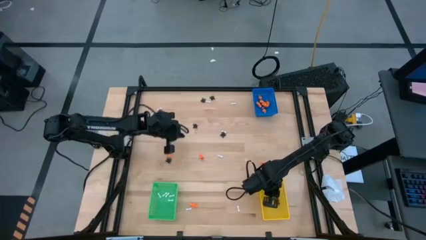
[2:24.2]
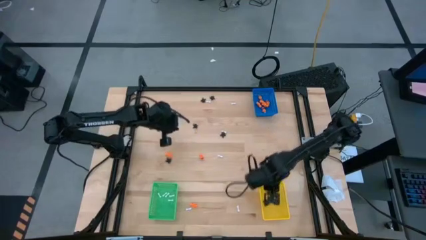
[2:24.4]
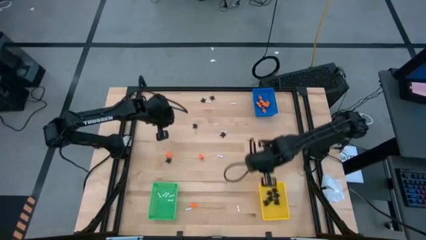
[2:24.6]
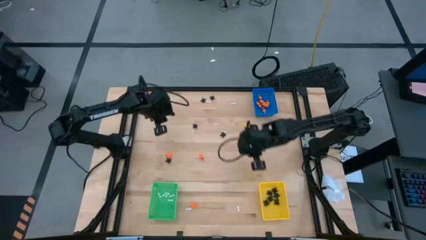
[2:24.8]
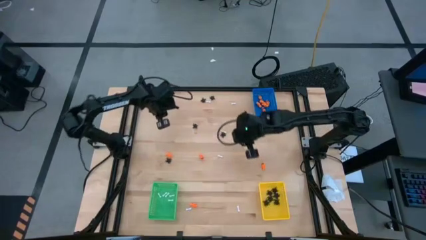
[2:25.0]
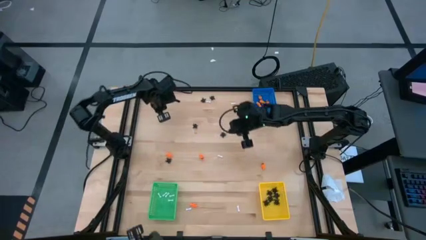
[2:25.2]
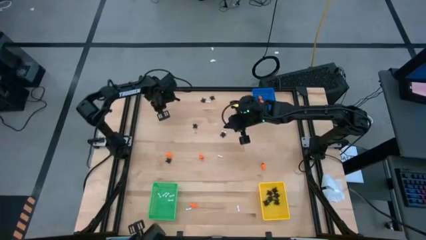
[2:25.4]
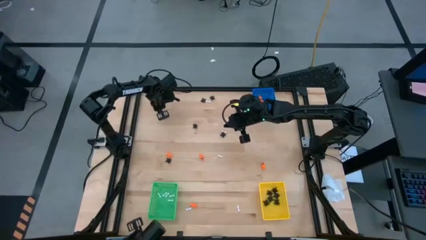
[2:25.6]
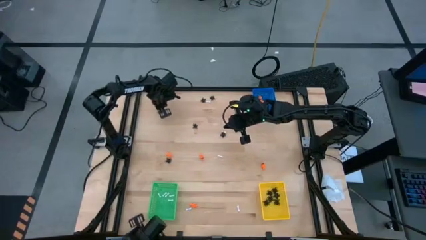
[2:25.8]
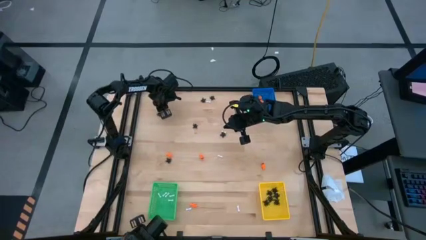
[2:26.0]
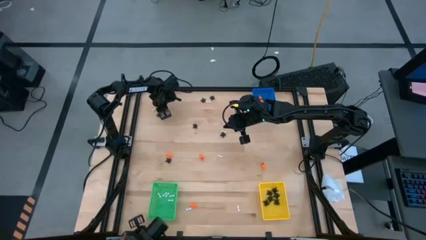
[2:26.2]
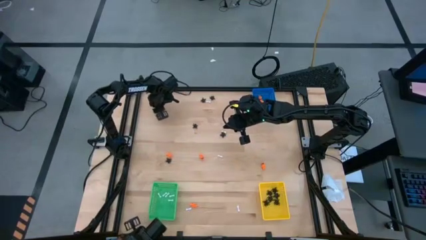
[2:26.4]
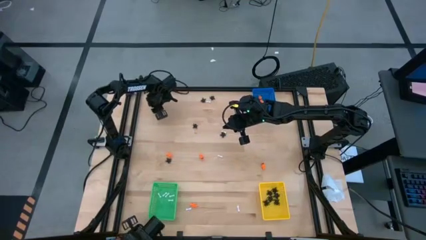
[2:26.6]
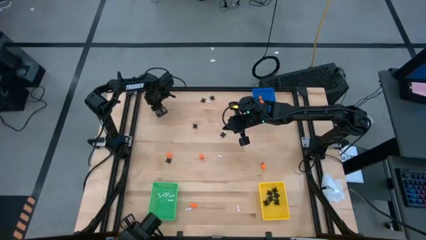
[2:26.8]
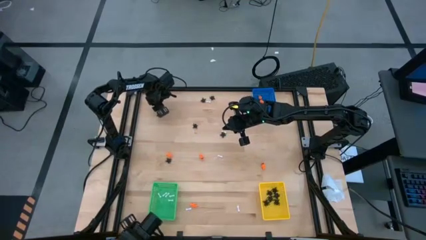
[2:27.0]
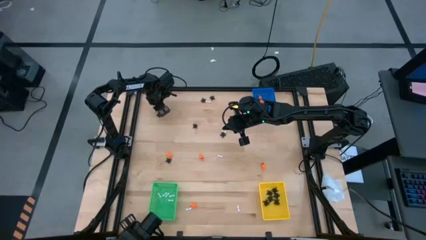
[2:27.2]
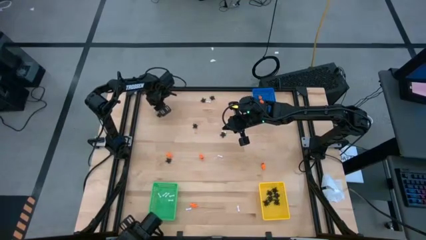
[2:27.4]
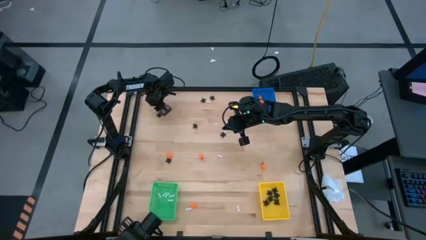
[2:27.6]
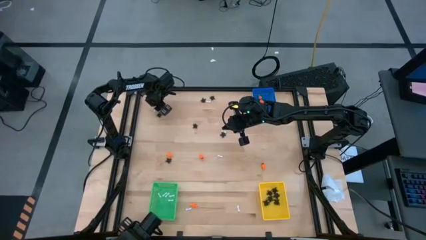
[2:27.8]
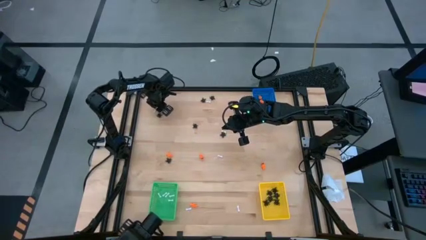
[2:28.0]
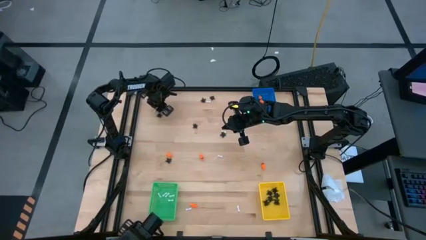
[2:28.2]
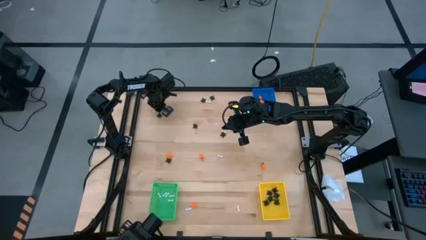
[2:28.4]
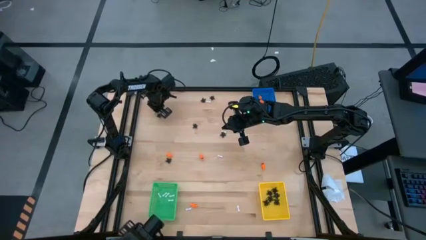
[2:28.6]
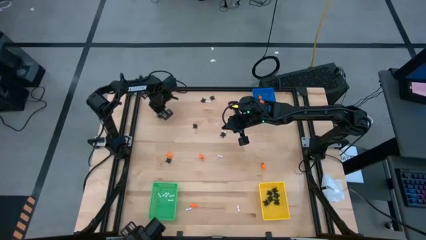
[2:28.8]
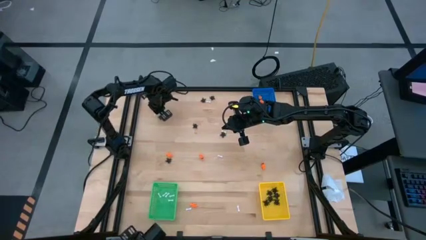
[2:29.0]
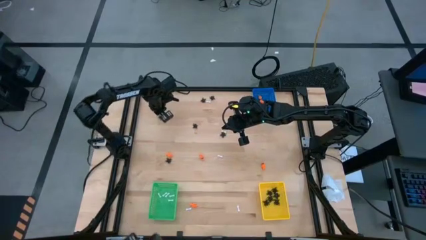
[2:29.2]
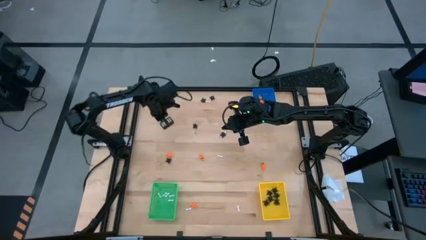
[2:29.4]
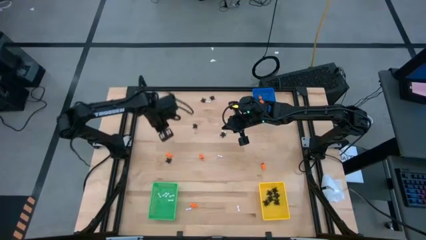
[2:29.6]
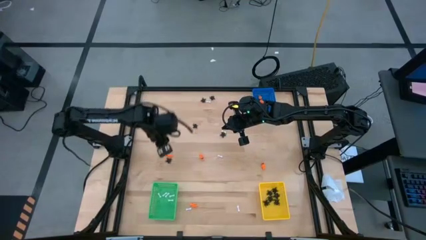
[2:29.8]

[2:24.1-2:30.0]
Task: Sort Halloween decoration
Put the white bone toy into the green bin

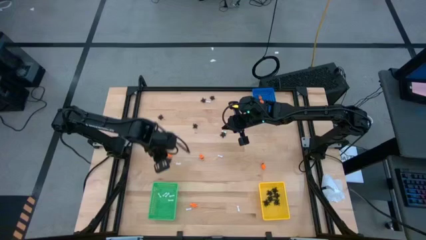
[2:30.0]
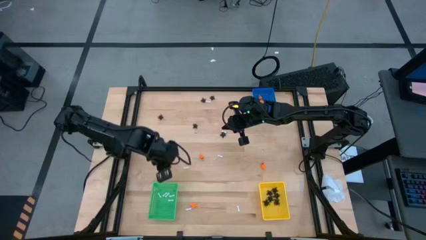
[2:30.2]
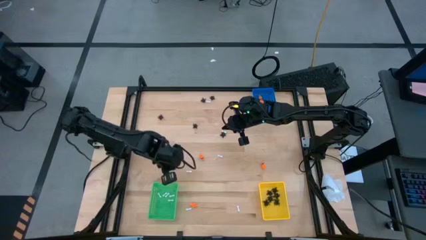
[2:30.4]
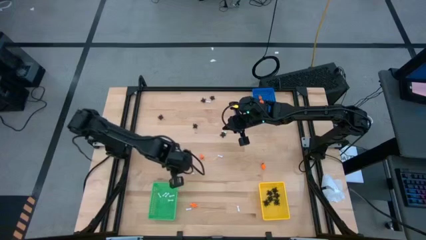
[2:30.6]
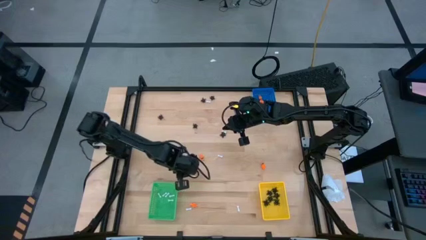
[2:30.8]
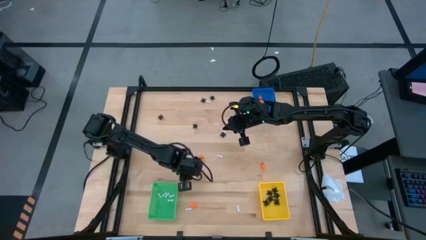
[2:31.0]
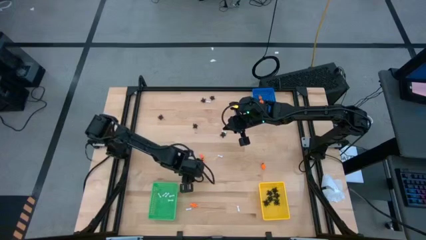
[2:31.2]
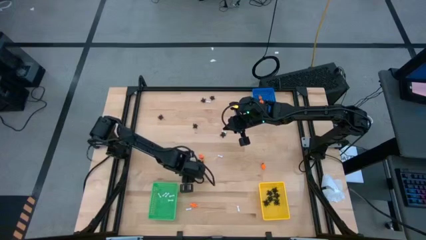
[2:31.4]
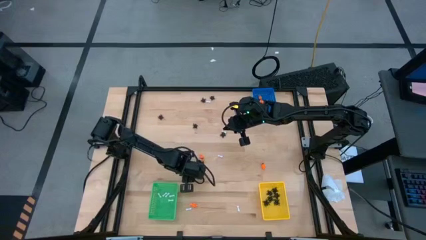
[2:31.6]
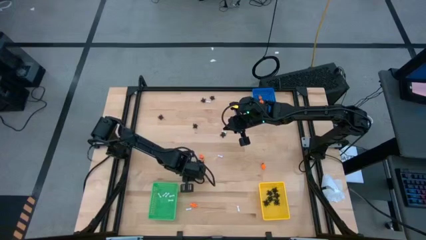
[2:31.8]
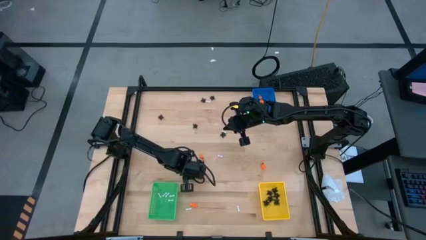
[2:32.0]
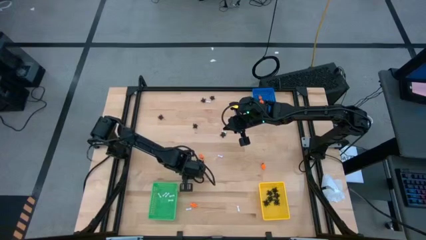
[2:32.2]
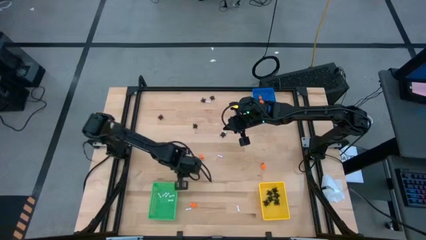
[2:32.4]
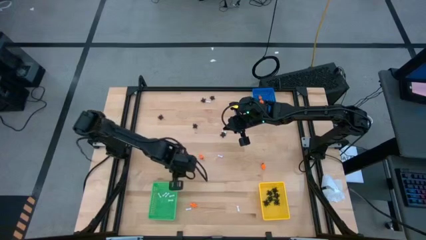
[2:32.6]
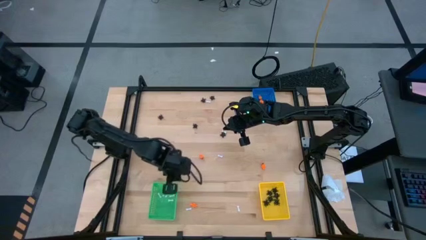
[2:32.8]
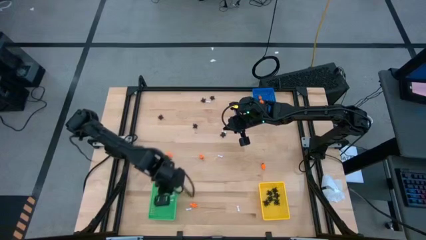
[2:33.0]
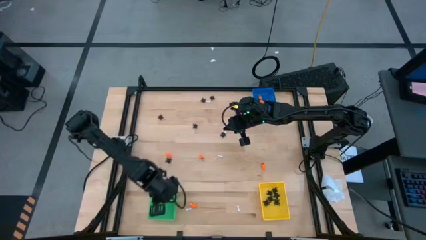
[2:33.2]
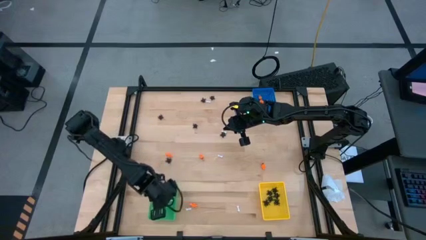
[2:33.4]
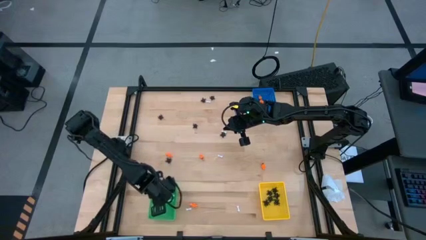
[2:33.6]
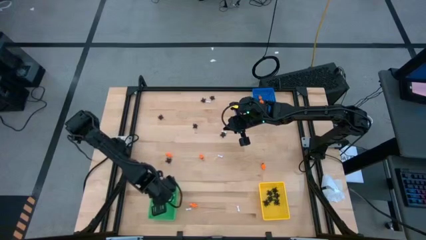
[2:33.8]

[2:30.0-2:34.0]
Put the white bone toy into the green bin

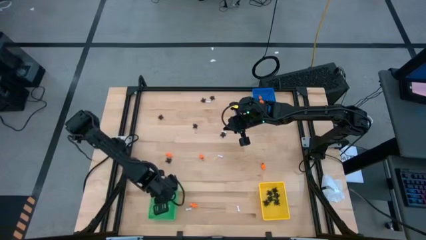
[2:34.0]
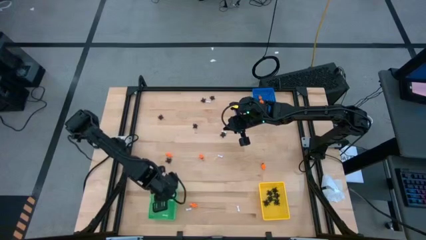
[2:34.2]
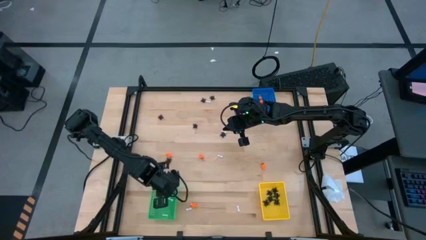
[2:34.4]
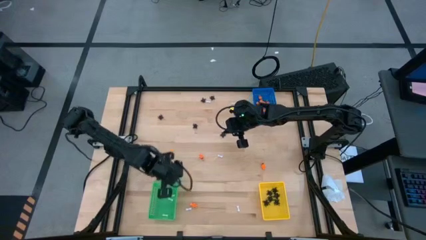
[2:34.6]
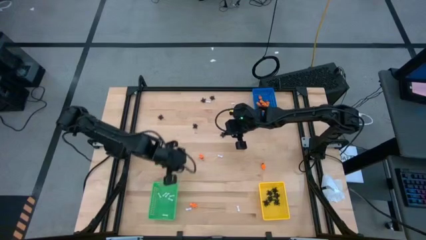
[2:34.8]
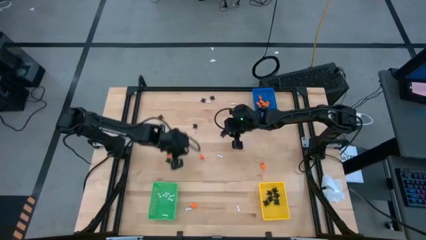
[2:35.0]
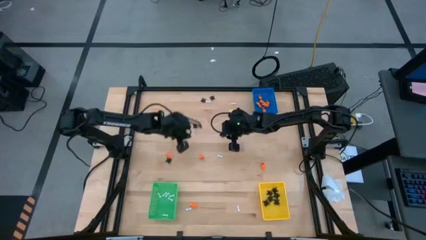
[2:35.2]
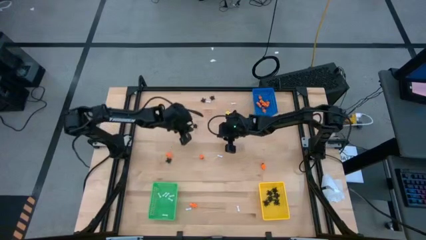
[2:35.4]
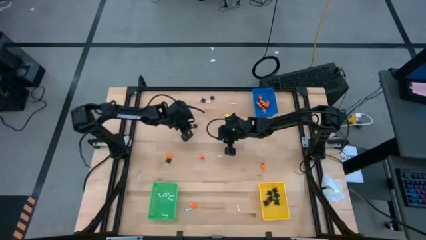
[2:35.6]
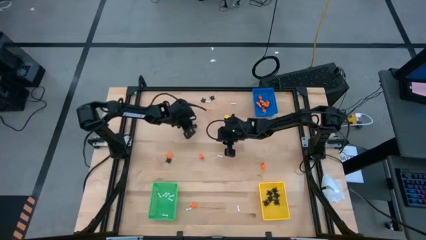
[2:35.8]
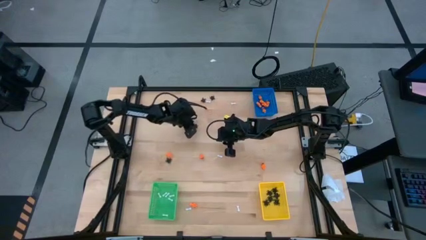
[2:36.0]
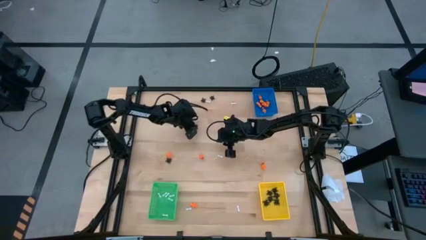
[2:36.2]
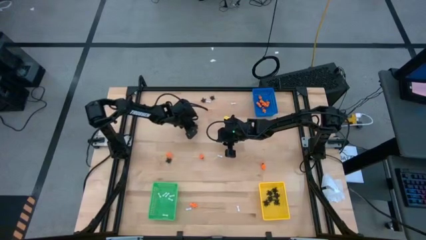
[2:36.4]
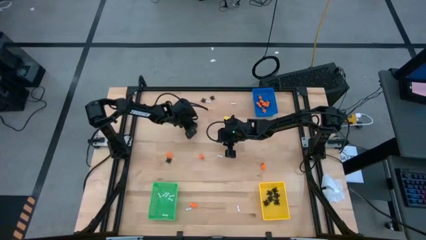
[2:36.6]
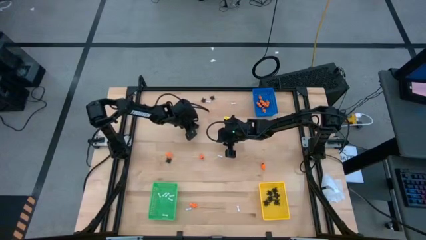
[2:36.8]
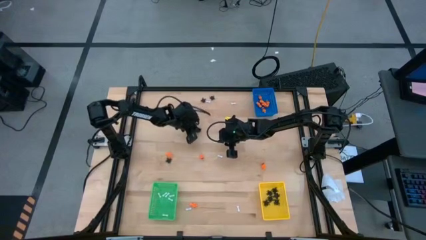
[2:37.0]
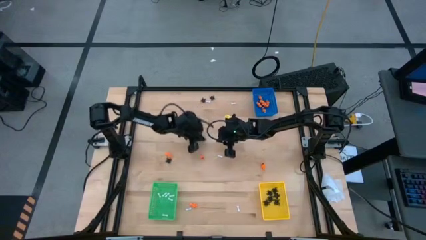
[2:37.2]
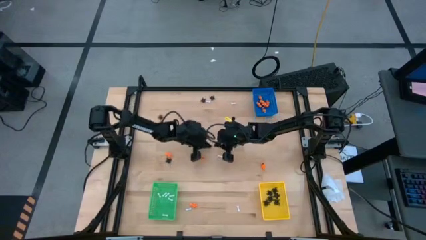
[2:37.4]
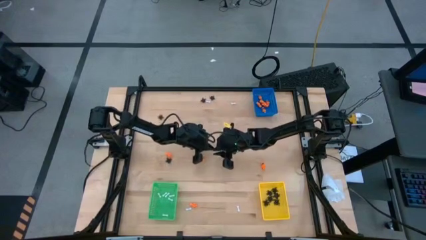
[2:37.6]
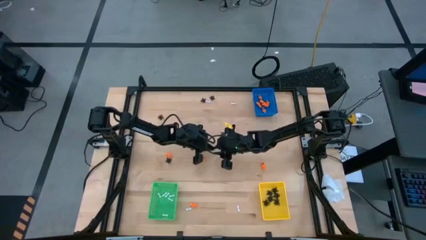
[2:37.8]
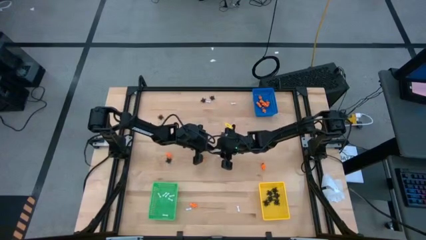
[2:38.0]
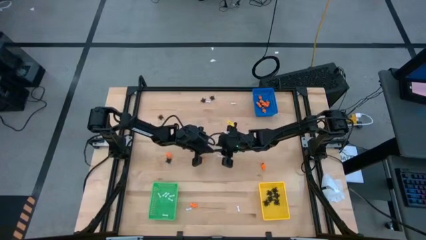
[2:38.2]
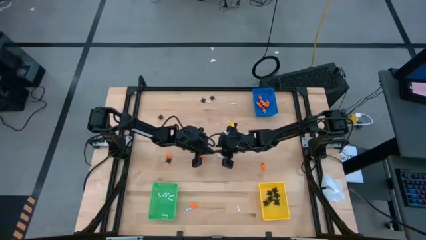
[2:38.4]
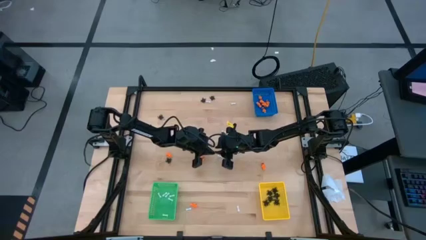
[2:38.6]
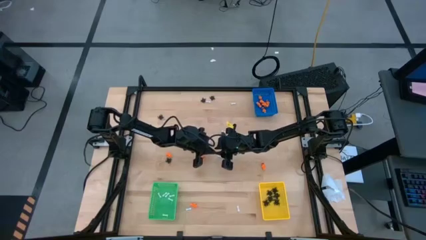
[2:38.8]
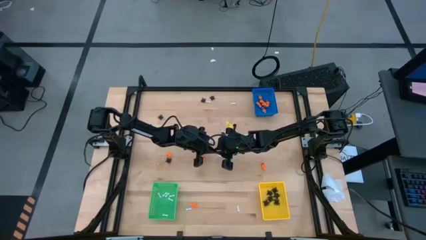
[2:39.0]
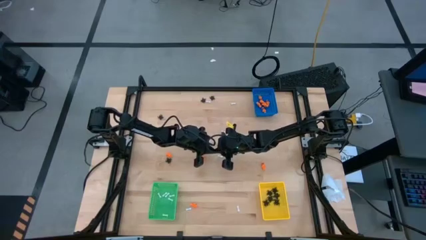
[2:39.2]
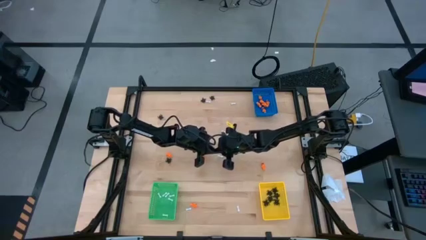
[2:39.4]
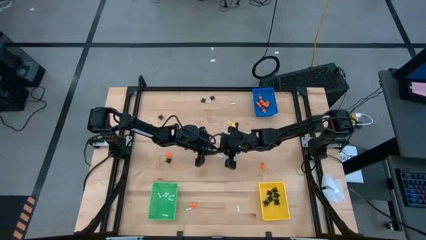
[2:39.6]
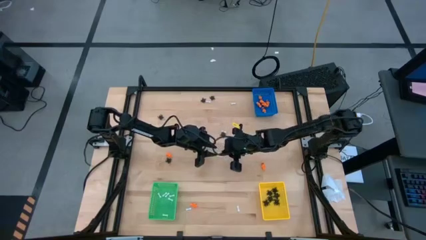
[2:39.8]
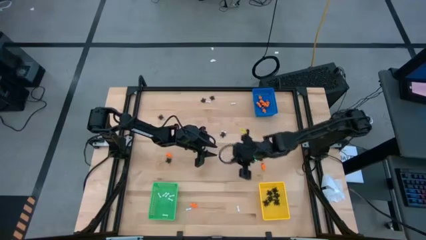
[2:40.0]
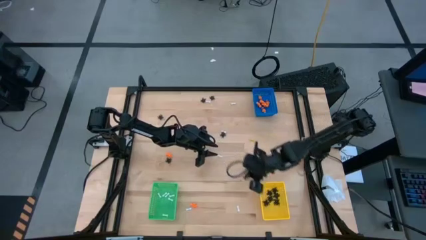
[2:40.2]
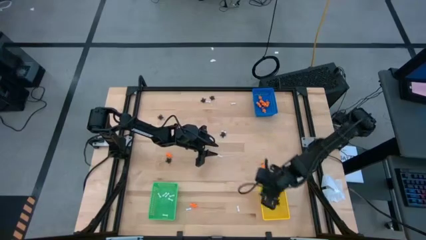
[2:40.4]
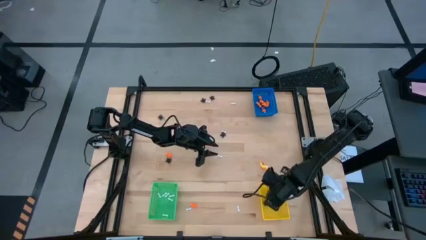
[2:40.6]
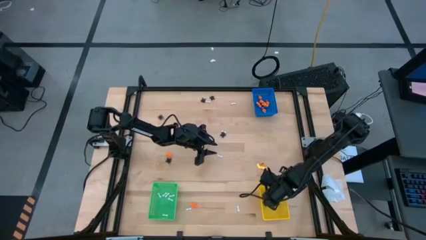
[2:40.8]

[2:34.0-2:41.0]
Put the black spider toy into the yellow bin

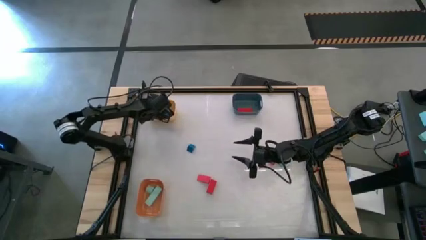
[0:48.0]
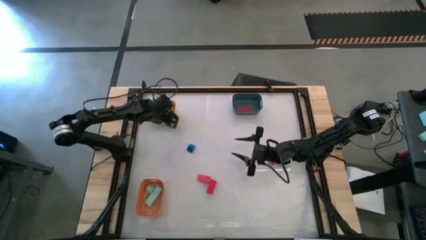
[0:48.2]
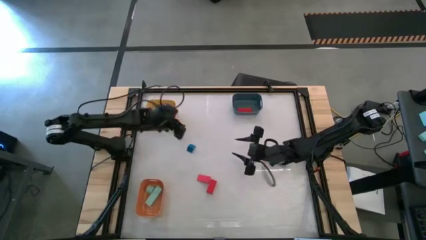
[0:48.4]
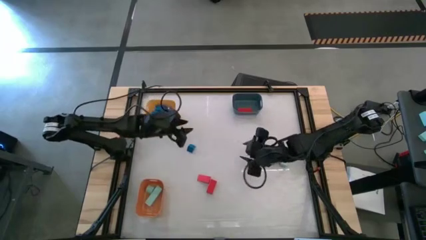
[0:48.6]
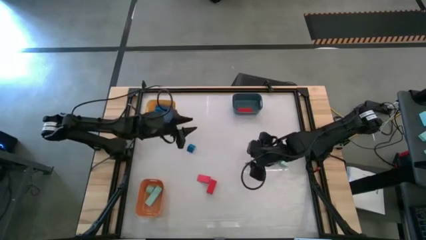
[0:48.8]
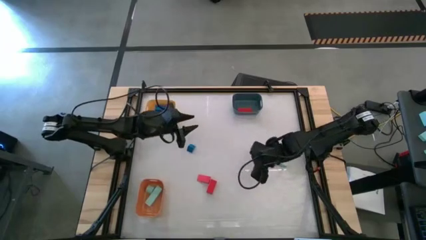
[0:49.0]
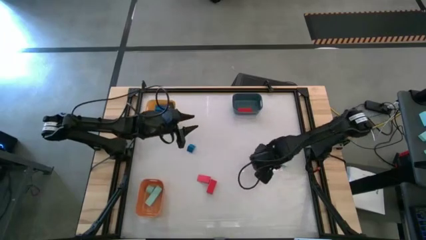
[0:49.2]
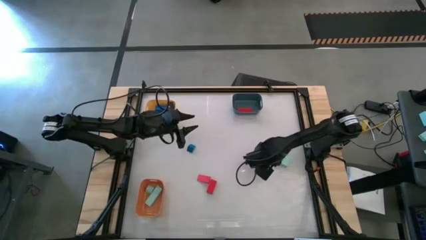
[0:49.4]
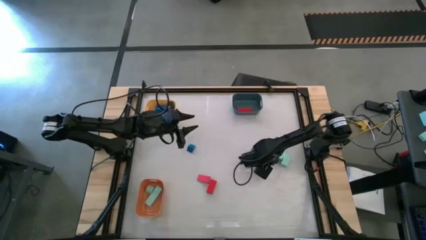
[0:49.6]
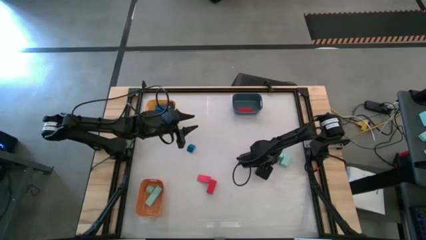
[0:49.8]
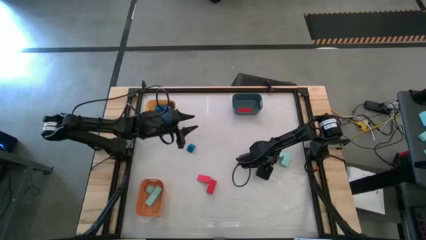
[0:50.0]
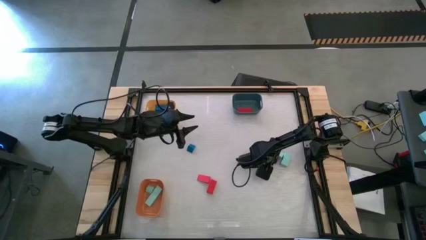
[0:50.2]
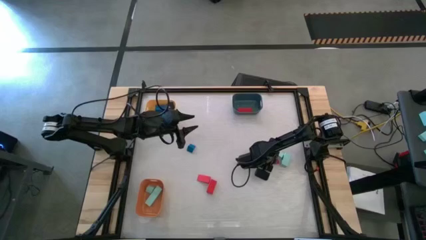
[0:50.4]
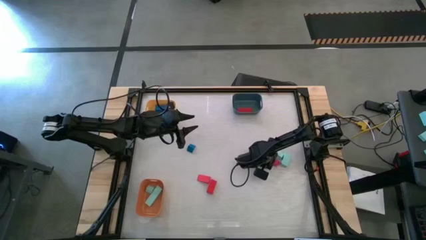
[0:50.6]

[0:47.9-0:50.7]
Task: Sort & place blocks by color
Put the top right red block into the blue bin
